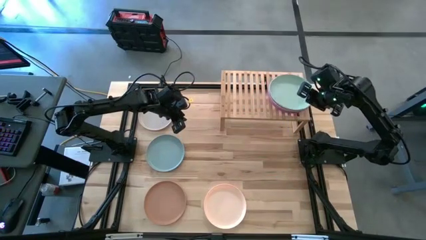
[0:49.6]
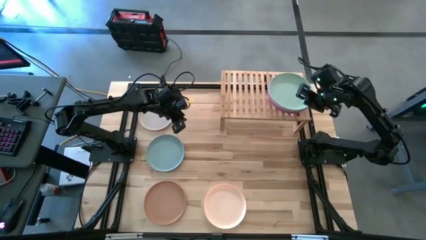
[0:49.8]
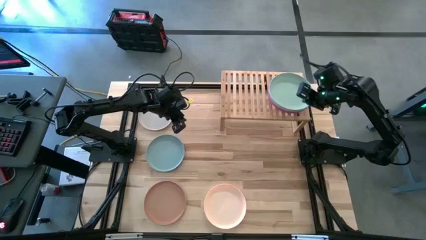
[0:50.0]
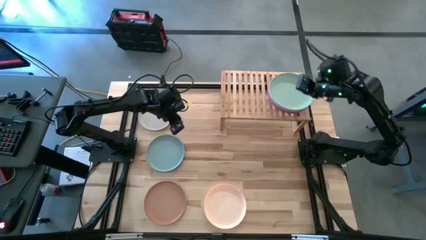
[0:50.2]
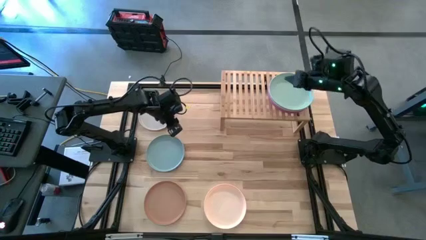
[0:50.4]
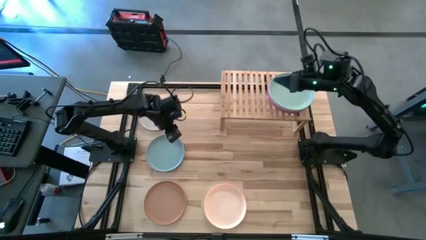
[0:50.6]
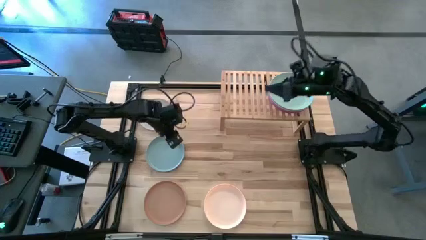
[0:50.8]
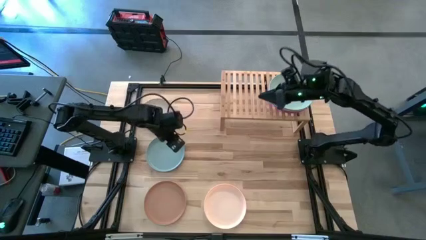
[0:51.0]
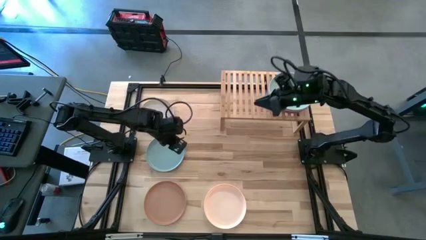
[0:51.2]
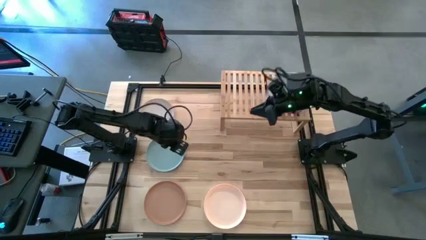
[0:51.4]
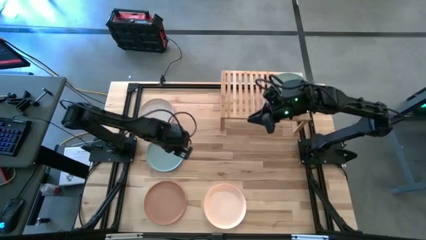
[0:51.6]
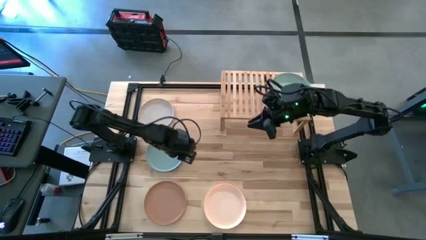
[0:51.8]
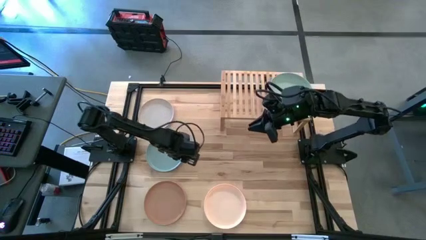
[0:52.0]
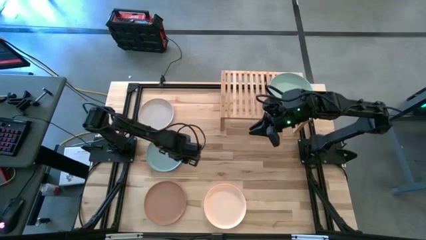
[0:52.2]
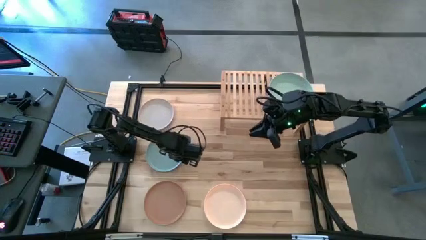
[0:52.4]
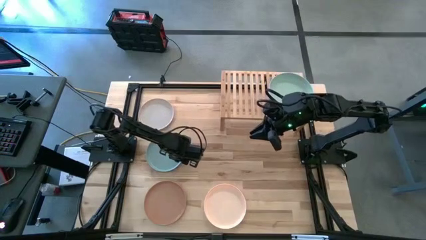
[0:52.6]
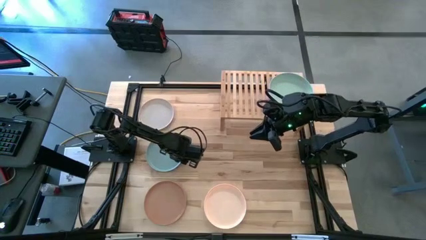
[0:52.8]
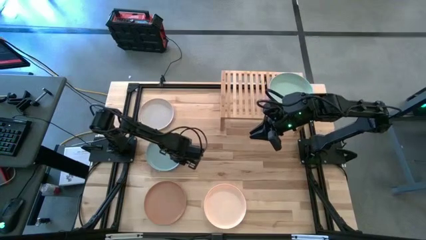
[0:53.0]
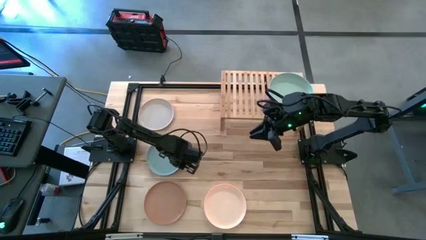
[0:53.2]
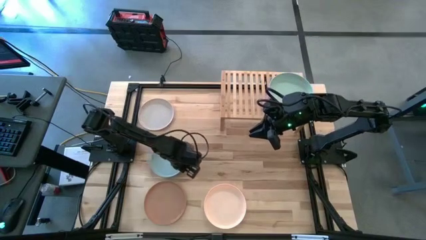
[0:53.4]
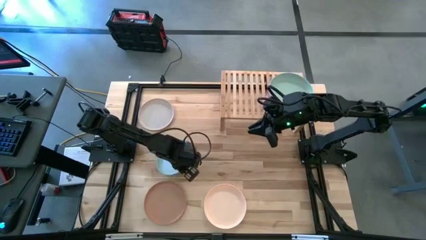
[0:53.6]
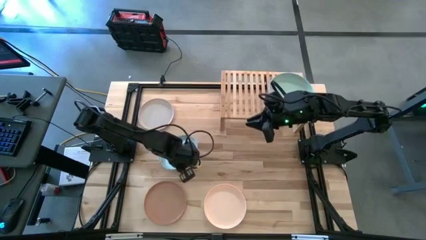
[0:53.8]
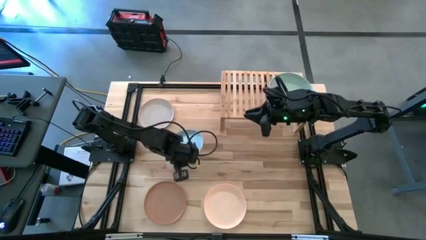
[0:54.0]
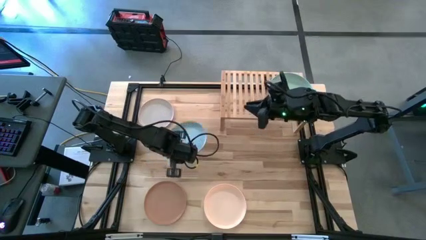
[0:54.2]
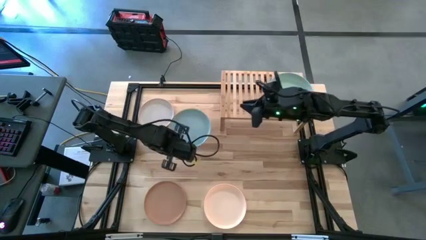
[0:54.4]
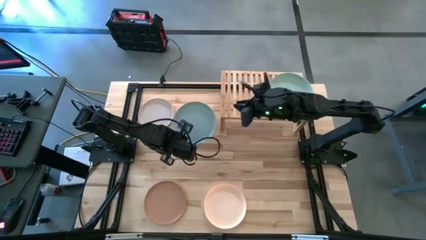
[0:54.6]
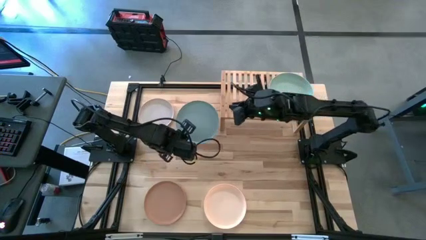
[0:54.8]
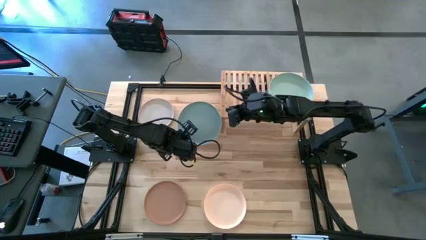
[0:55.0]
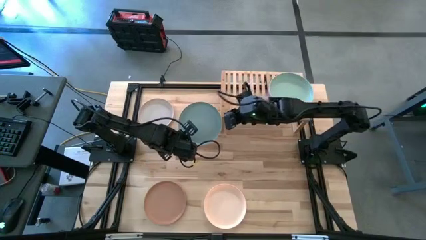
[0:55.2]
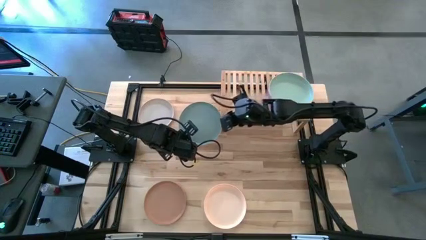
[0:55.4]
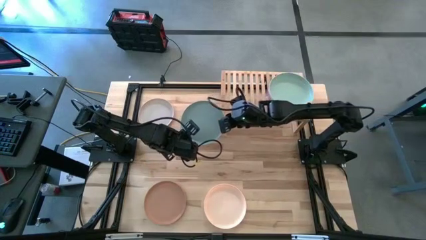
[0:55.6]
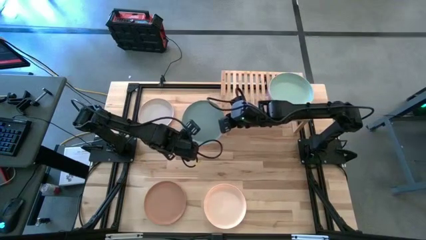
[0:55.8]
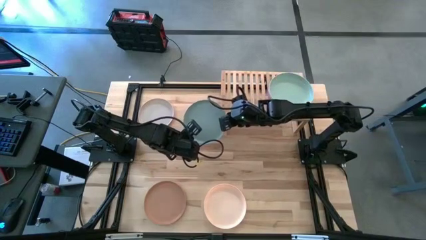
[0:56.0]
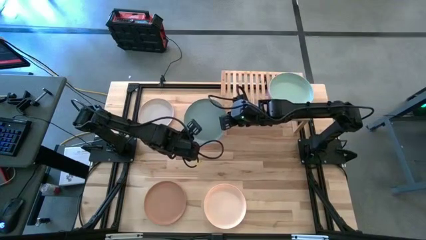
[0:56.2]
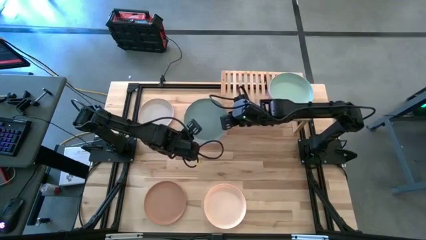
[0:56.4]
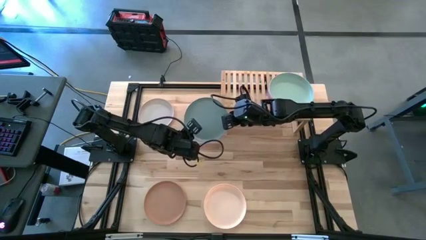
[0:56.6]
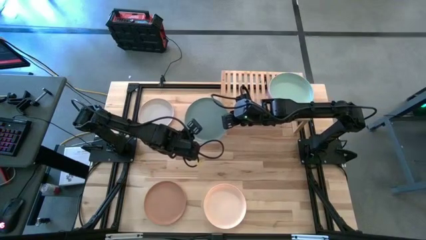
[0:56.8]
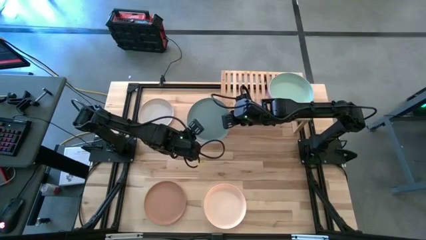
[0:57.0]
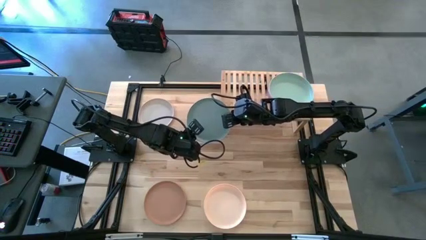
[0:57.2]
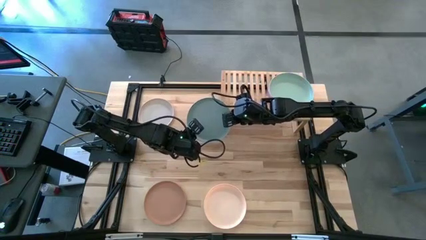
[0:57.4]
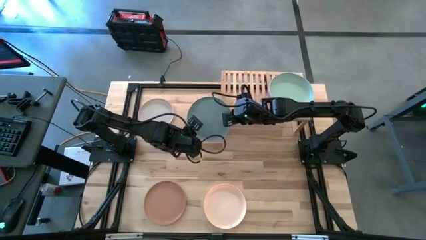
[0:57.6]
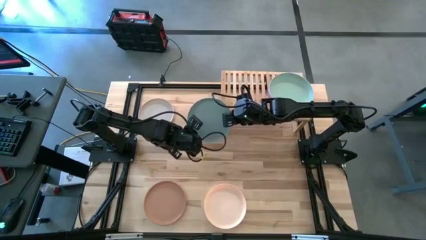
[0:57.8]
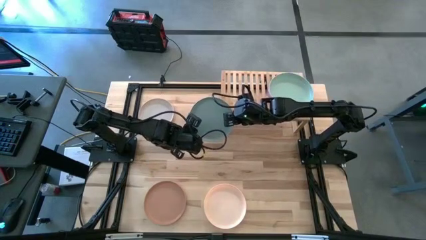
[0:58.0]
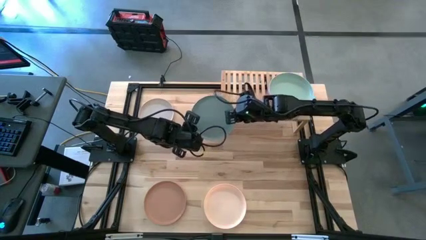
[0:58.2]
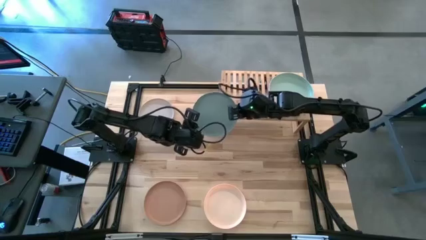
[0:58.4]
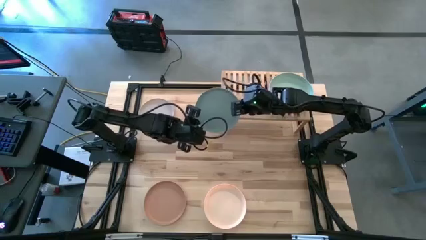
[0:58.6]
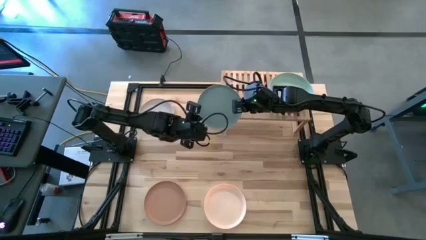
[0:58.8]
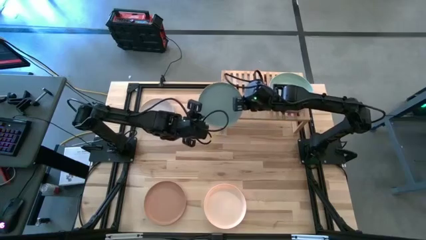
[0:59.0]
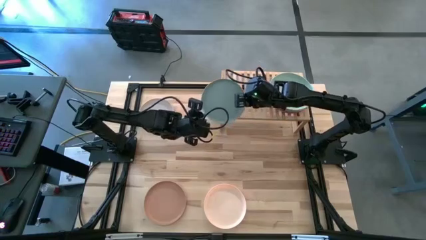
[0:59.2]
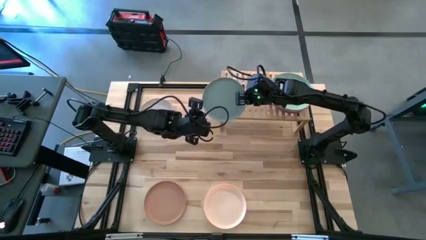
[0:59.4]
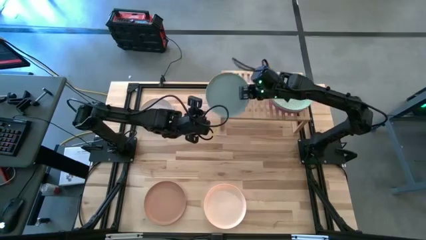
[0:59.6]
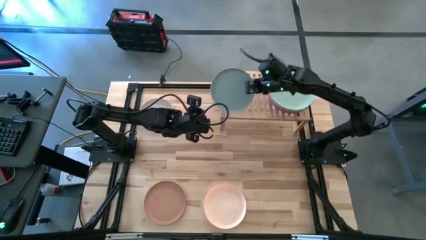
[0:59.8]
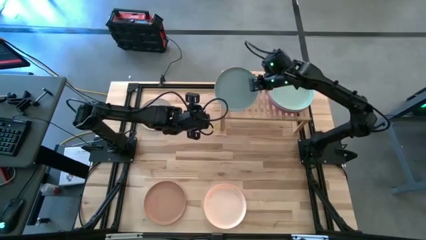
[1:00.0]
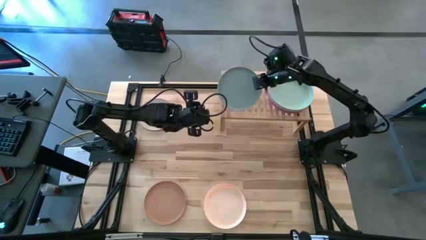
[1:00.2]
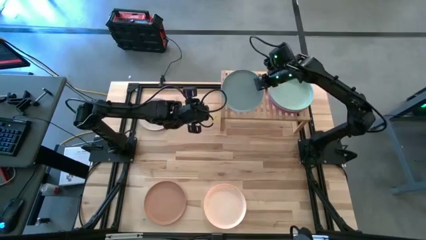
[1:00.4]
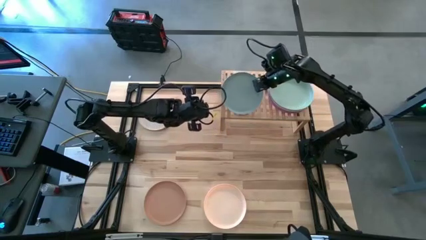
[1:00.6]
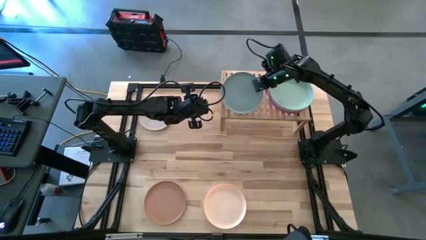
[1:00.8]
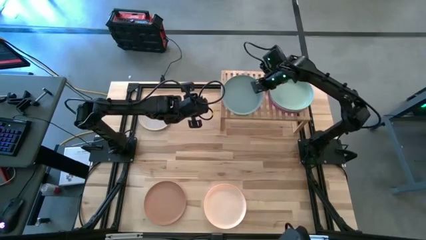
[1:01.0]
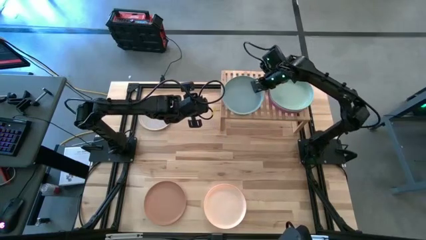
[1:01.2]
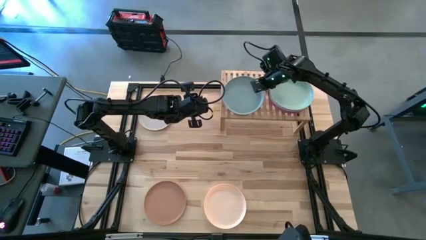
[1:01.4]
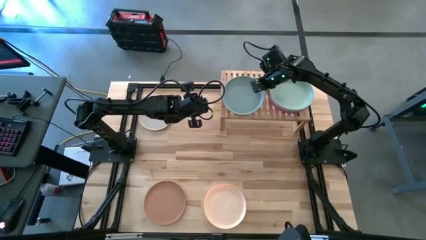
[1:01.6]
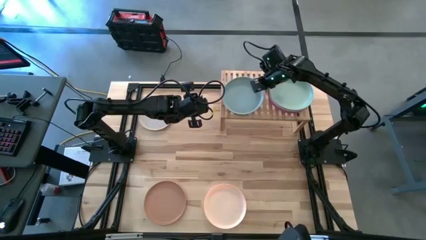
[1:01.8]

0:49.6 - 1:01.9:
Task: Place and stack plates onto a shelf
Put the light blue plate on the shelf
